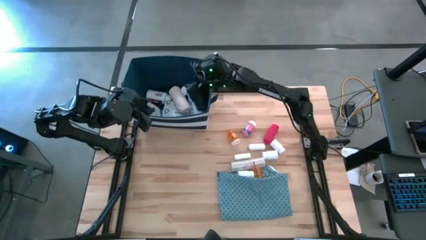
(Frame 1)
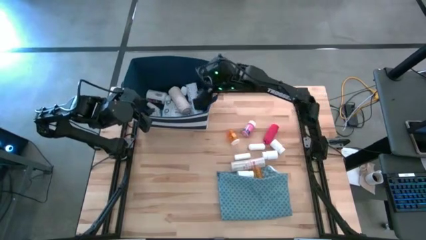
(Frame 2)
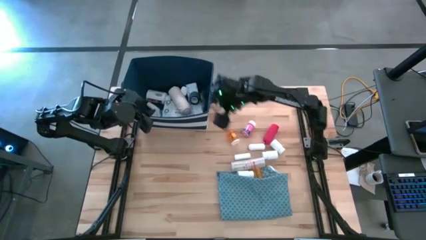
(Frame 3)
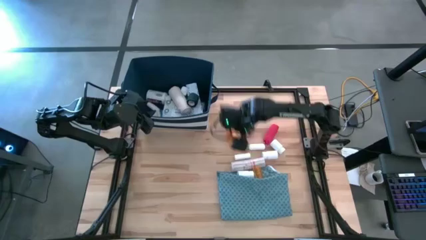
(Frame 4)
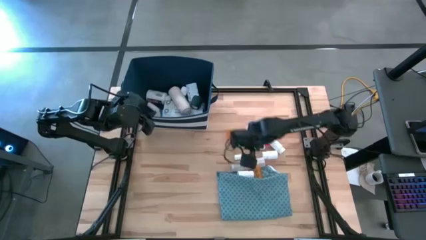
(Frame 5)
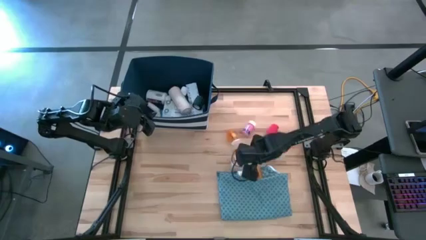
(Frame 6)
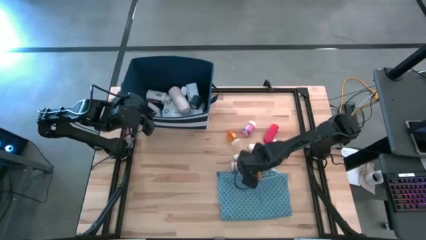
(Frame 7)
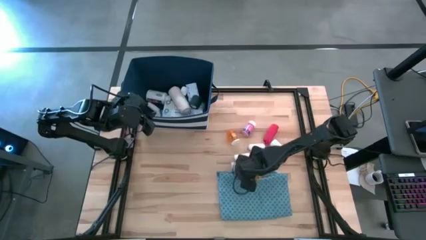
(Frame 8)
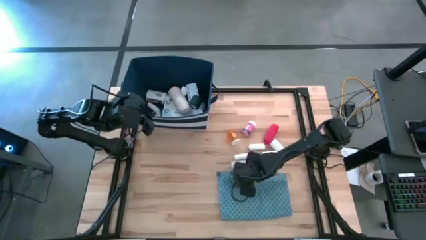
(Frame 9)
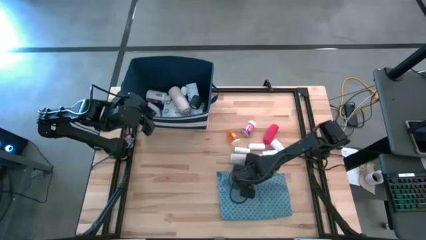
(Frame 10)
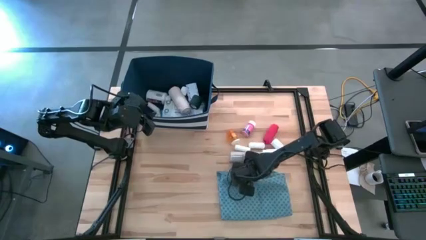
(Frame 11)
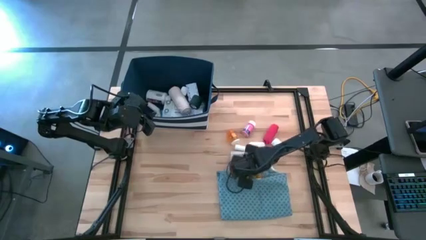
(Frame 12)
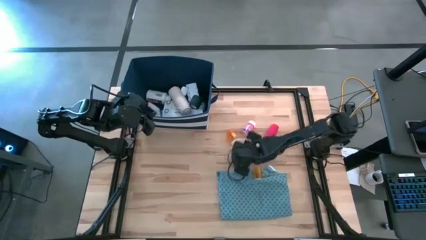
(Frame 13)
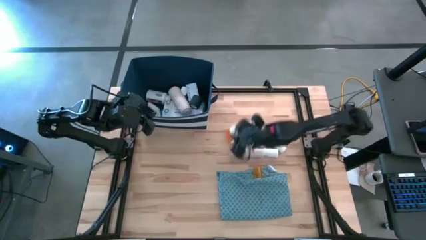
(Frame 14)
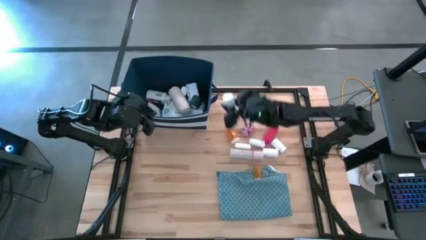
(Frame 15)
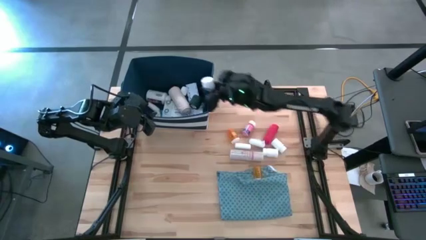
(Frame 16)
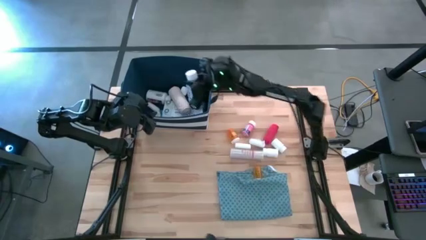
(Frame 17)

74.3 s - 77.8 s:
Task: Pick & place medical supplies in basket/bin
Put the white medicine bottle into the blue bin

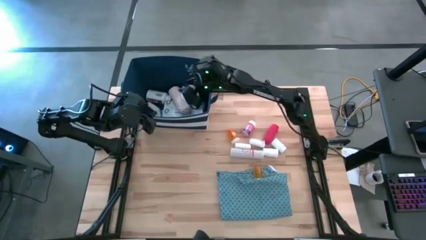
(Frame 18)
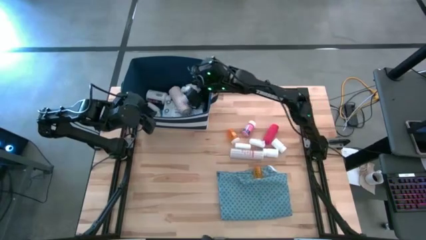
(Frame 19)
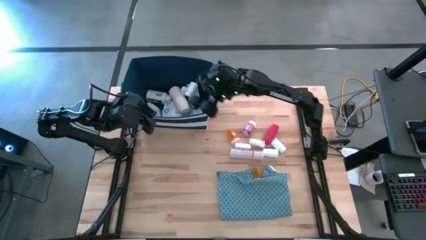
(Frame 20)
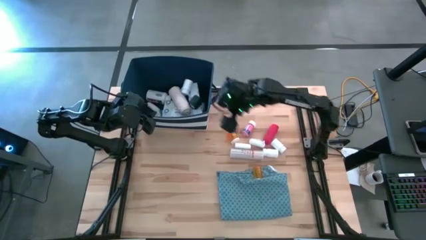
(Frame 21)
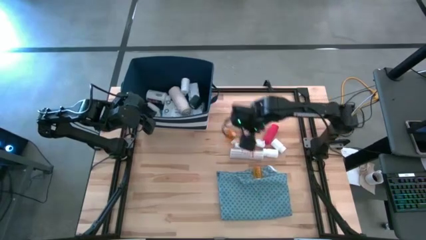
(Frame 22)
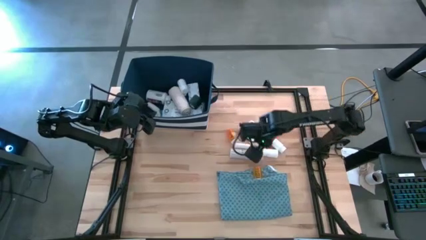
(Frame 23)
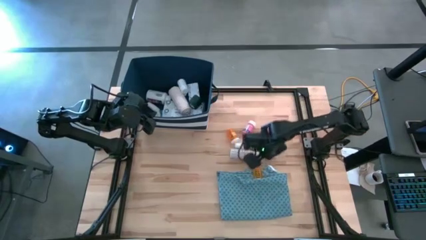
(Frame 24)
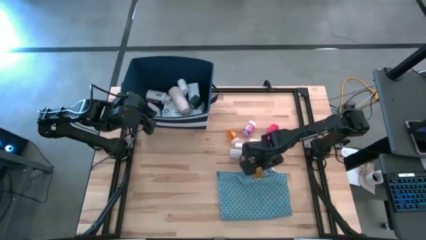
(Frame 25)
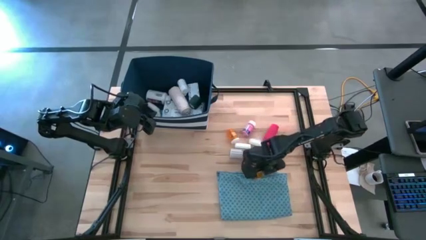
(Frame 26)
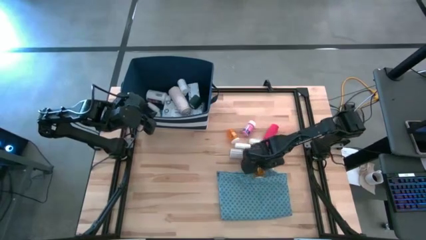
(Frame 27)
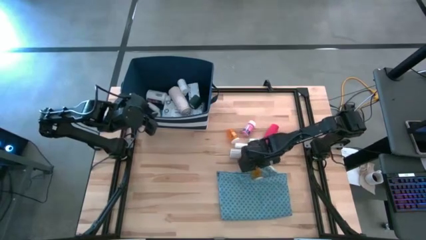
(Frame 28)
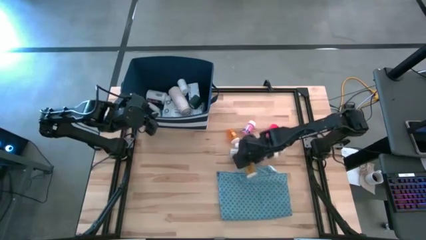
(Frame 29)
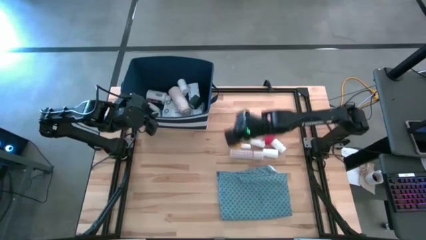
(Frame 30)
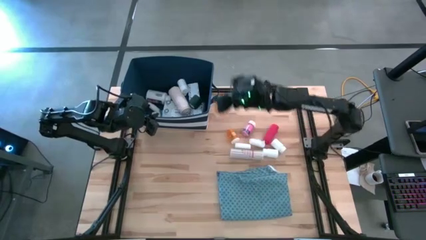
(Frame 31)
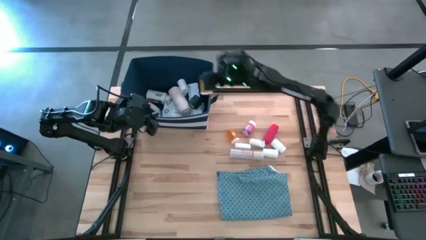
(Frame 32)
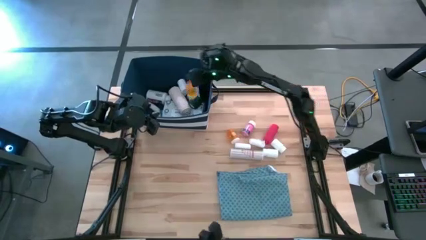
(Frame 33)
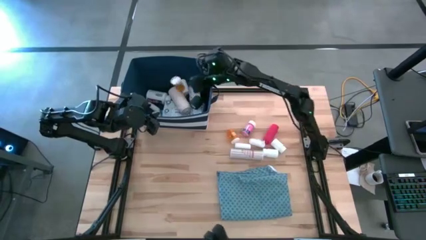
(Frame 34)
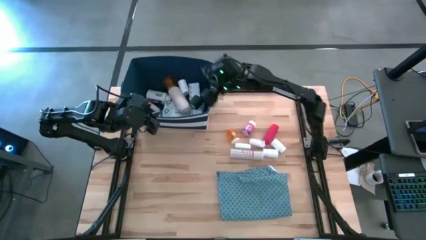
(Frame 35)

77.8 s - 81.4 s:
Put the orange pill bottle into the blue bin

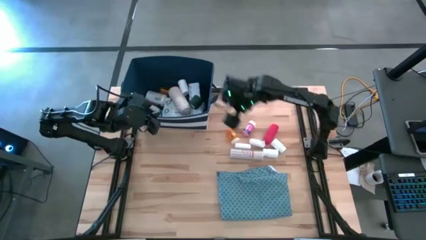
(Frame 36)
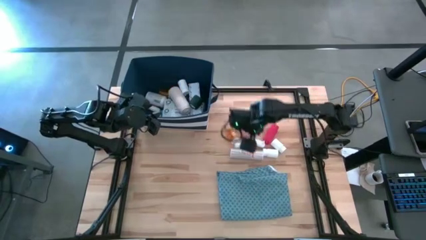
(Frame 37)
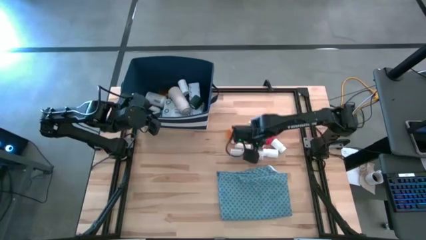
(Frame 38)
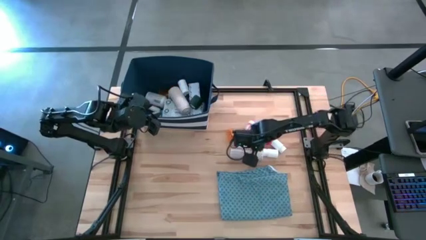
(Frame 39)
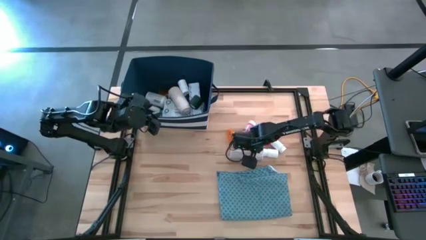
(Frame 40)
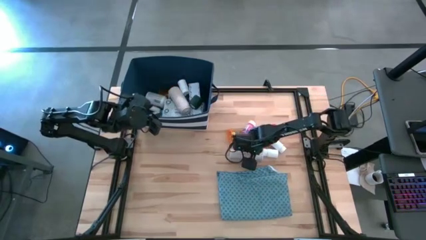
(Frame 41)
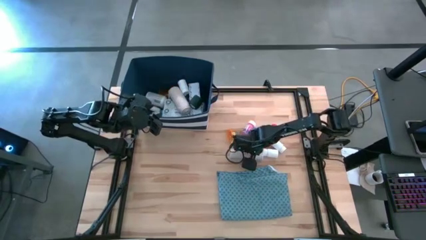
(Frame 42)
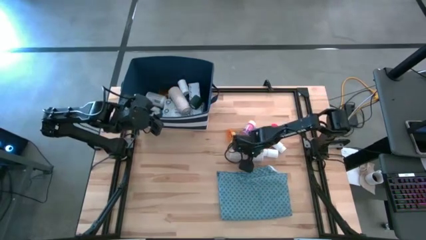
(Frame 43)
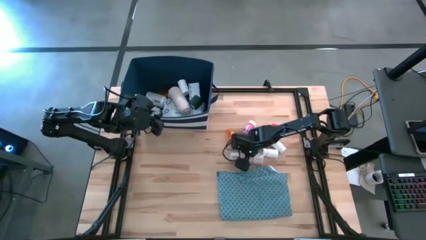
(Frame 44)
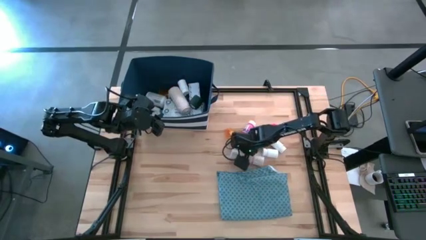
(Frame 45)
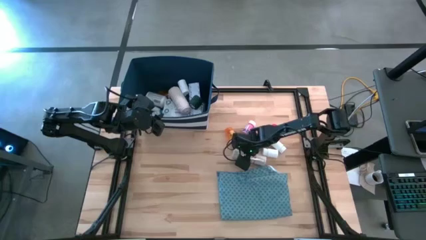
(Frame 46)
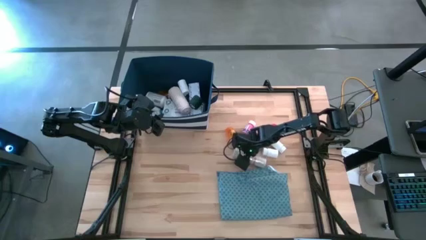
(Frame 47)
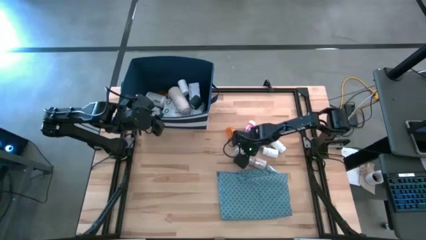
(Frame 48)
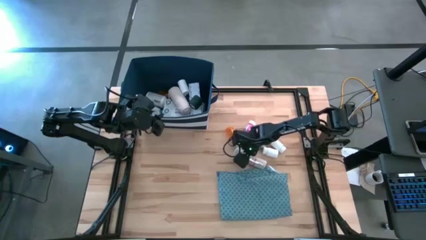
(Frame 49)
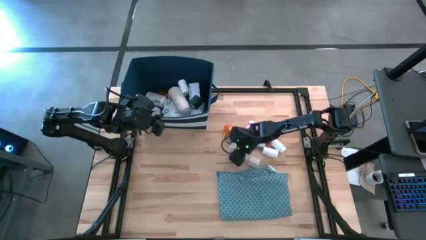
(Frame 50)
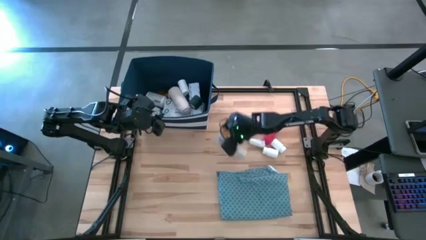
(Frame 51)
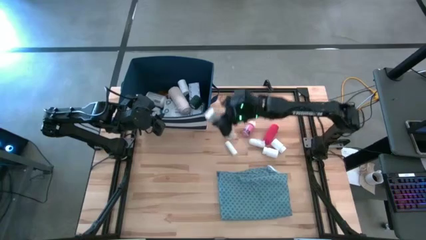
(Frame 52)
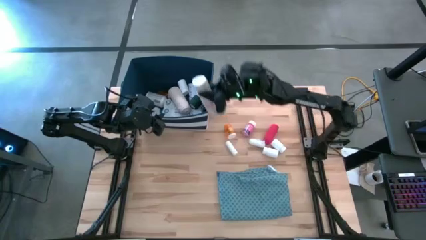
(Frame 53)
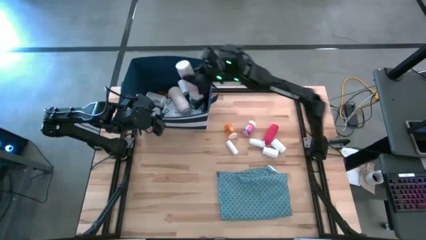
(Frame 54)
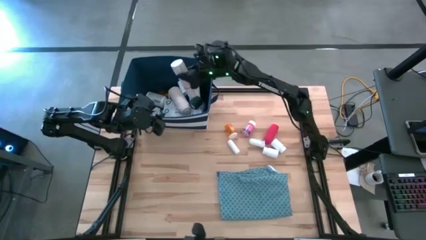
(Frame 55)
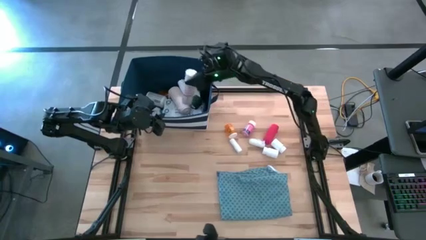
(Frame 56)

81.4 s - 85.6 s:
Put the brown bandage into the blue bin

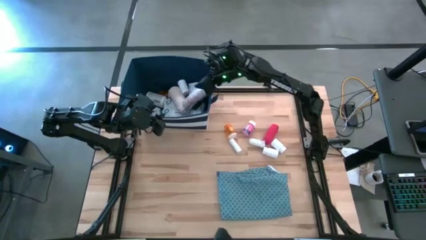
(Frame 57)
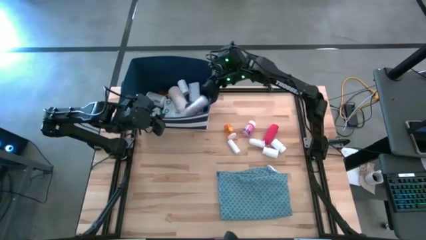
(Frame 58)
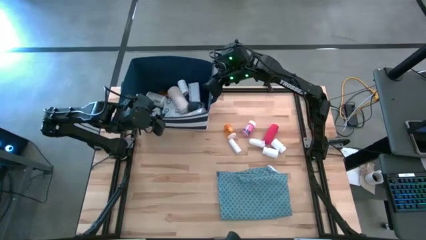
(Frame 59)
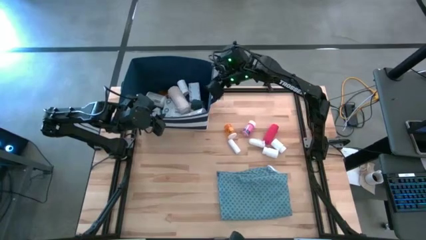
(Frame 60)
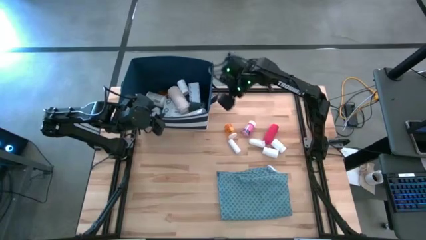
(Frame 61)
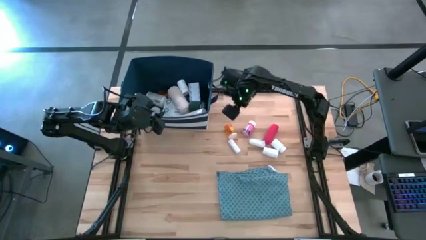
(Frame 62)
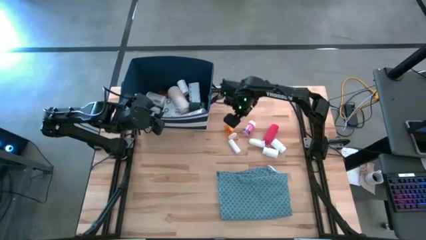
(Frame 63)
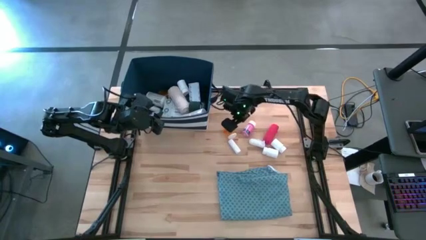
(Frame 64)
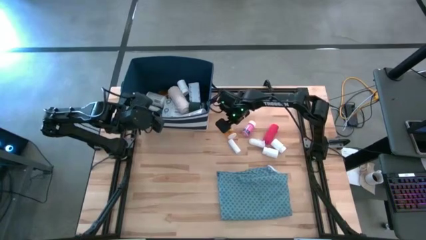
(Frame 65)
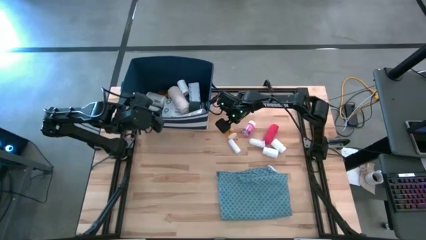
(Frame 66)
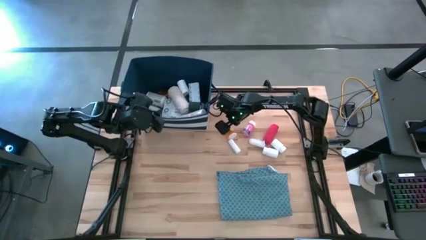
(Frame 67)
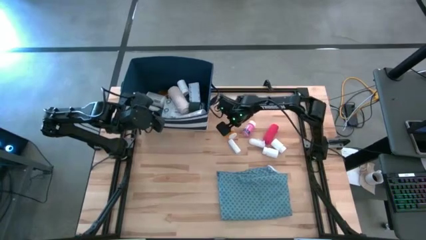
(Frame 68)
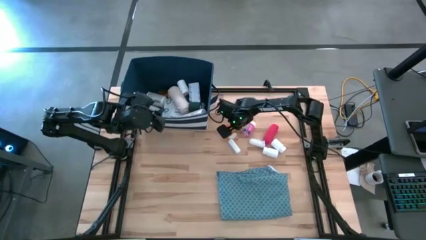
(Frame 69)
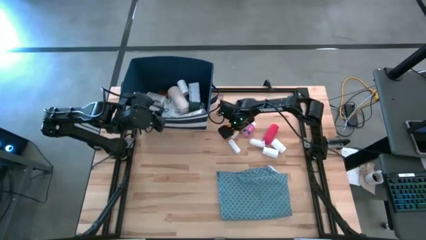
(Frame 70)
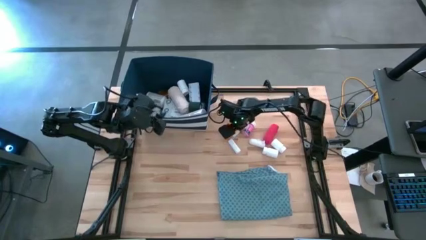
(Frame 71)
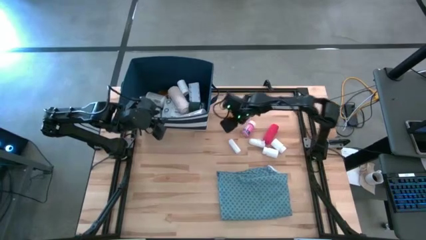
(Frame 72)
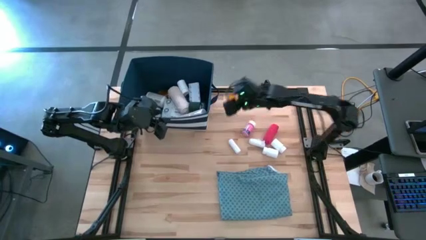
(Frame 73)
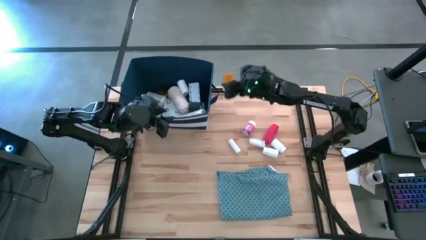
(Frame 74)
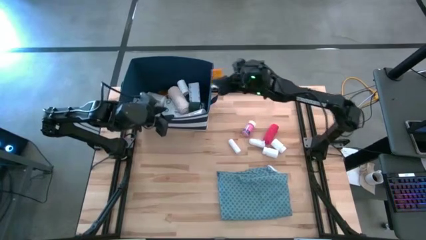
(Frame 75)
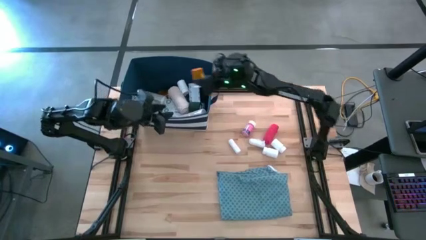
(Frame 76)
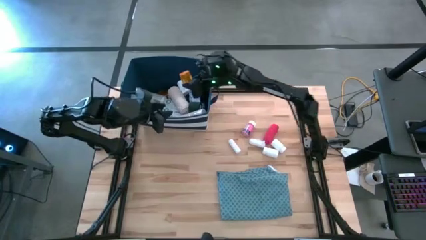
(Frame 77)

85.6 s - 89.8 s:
Put the orange pill bottle into the blue bin
